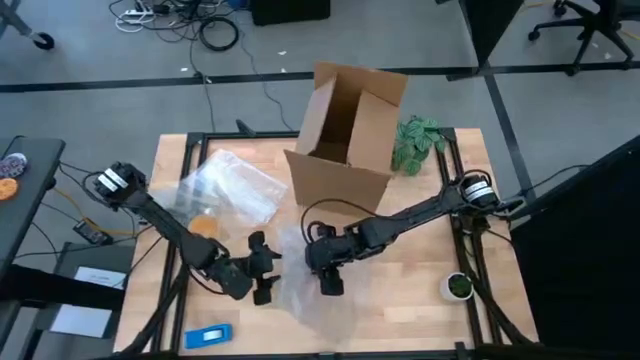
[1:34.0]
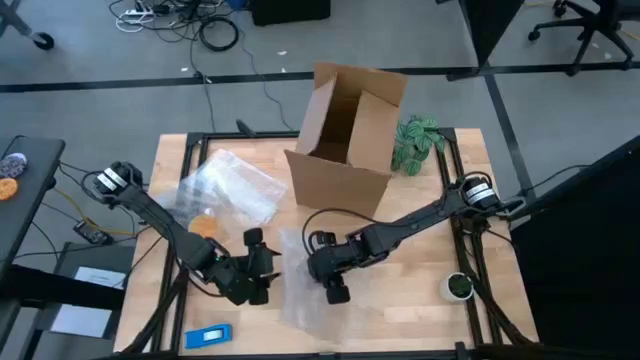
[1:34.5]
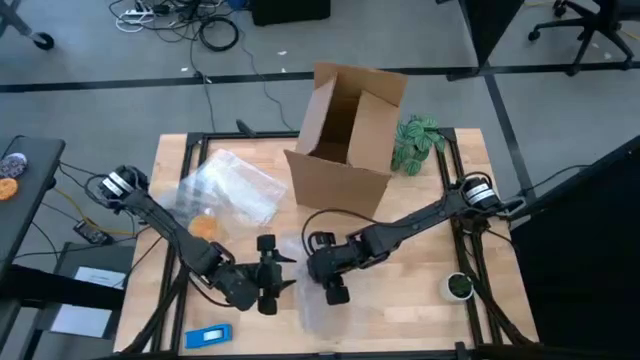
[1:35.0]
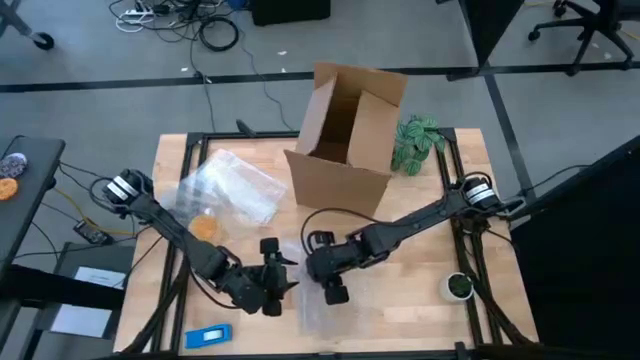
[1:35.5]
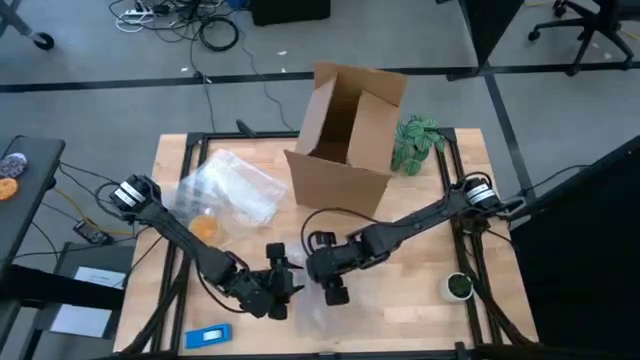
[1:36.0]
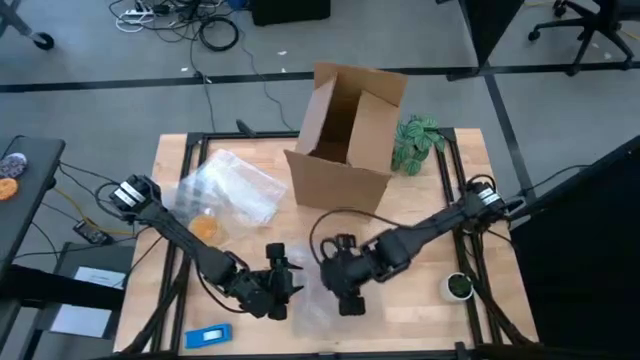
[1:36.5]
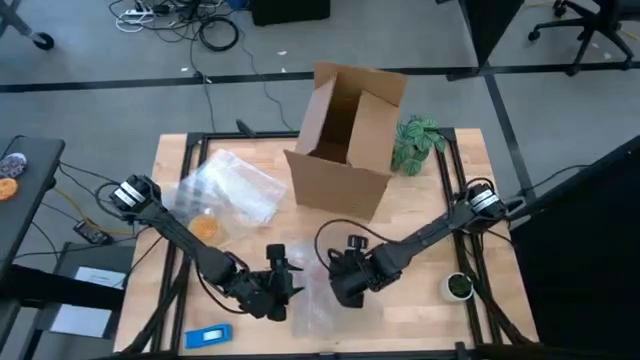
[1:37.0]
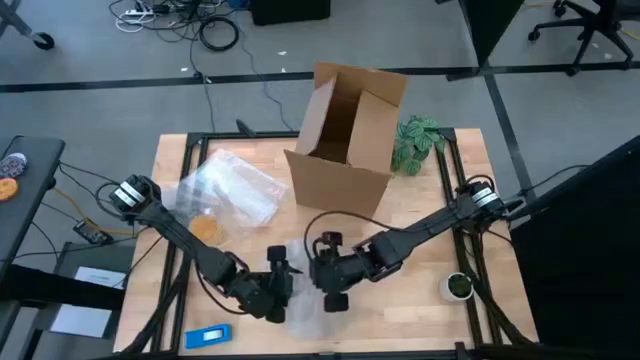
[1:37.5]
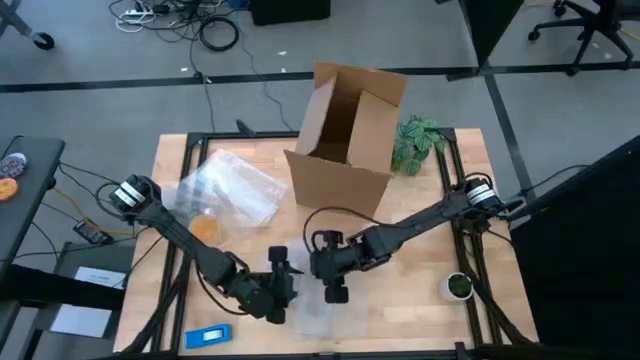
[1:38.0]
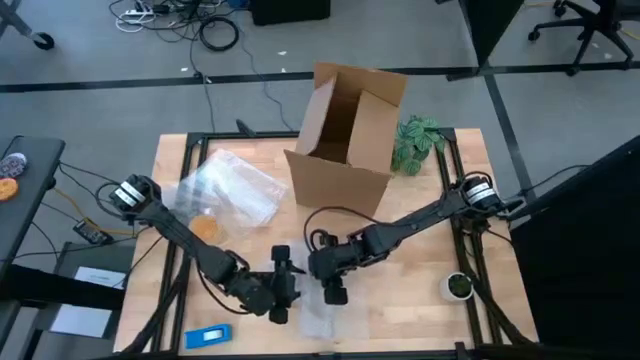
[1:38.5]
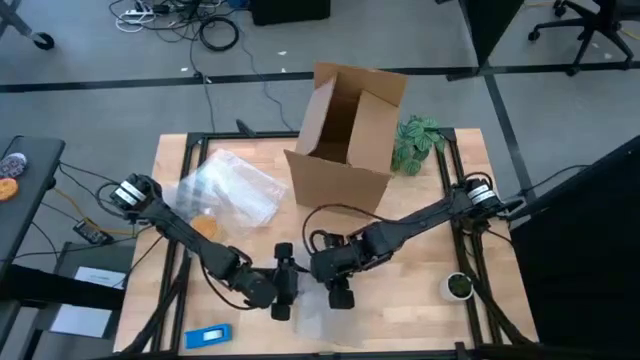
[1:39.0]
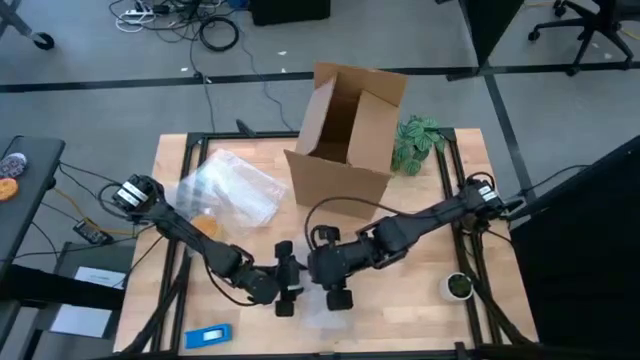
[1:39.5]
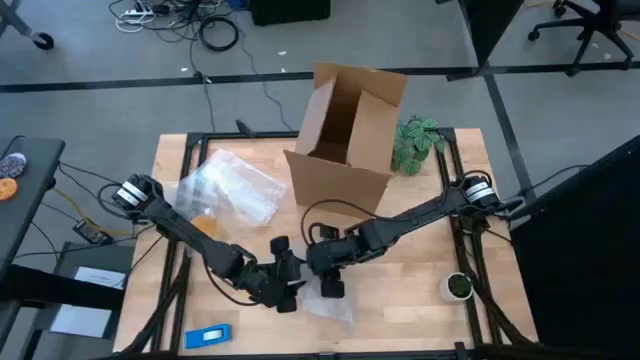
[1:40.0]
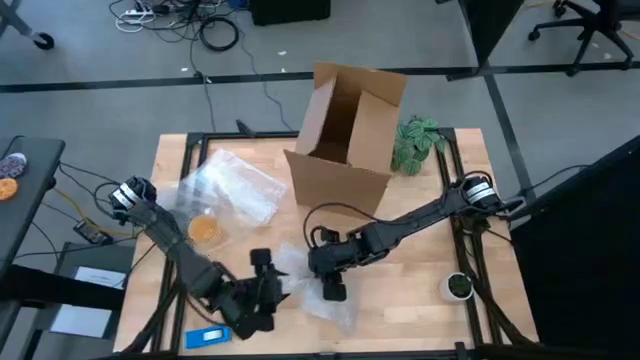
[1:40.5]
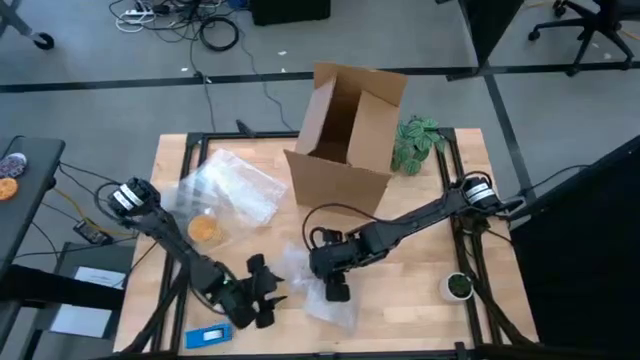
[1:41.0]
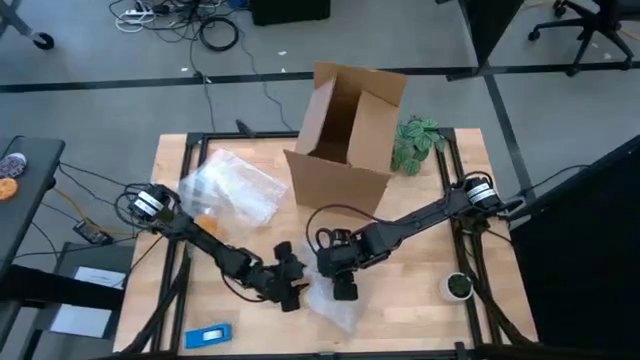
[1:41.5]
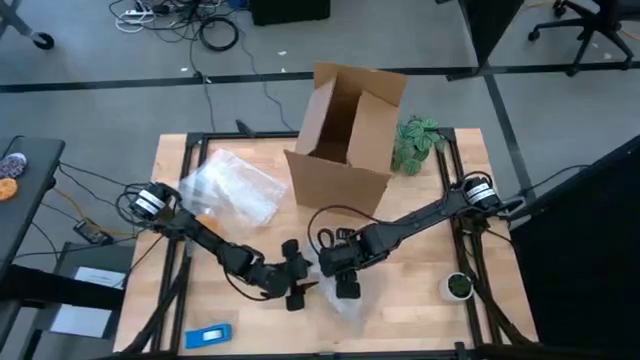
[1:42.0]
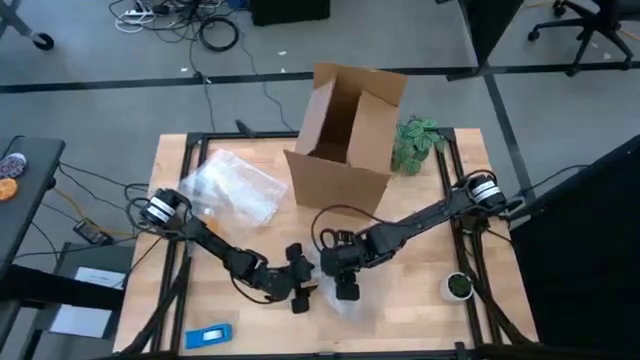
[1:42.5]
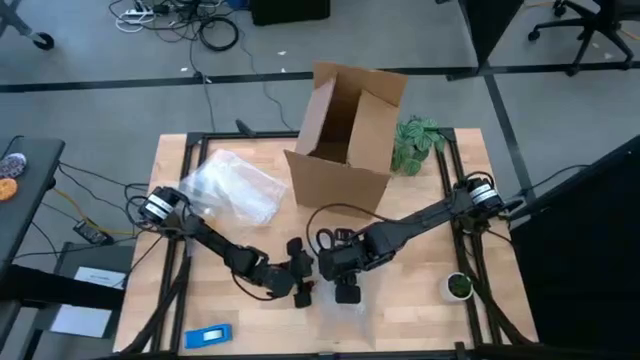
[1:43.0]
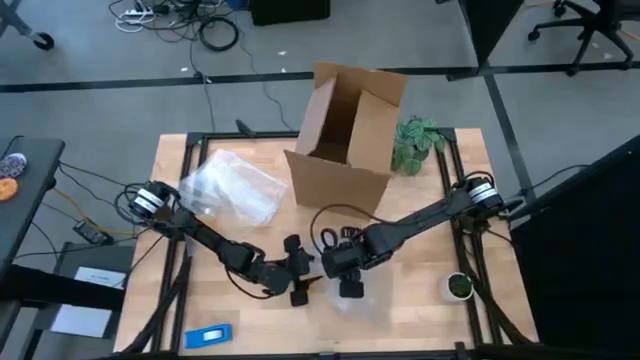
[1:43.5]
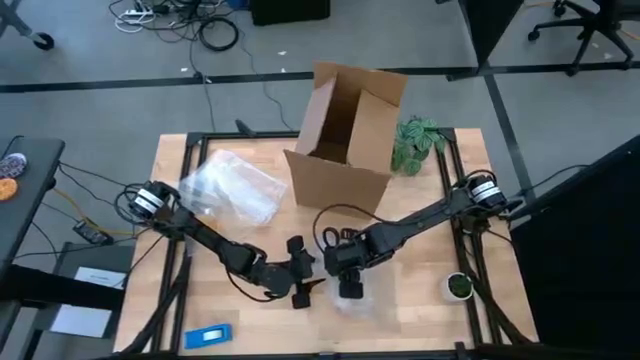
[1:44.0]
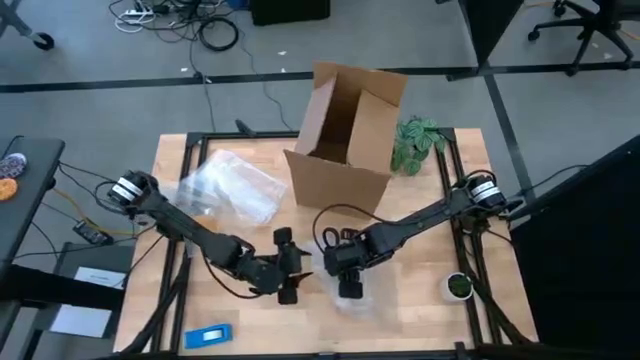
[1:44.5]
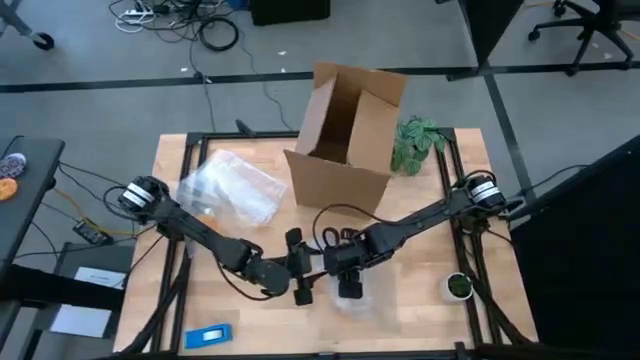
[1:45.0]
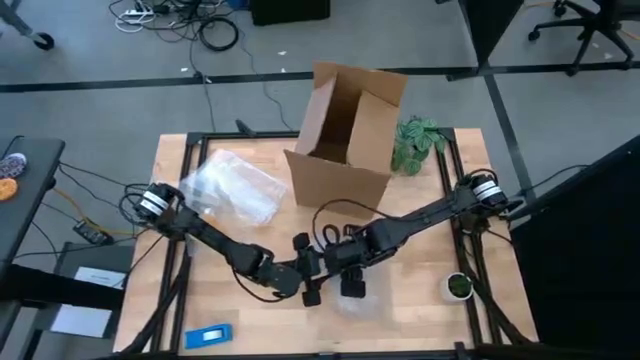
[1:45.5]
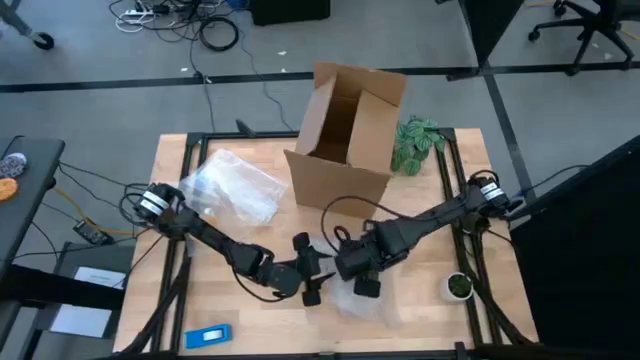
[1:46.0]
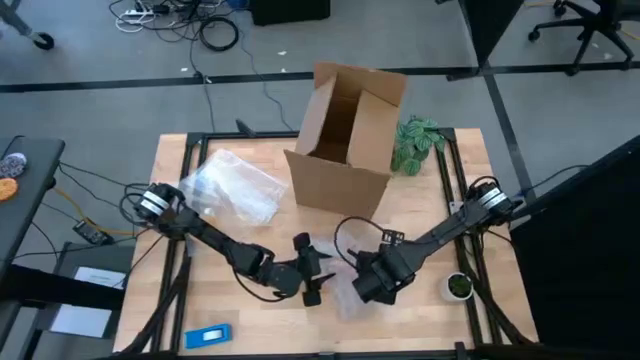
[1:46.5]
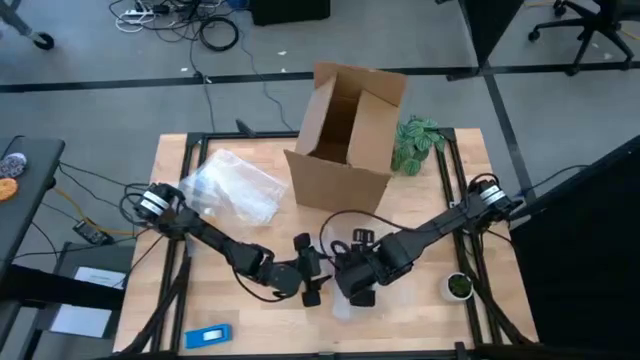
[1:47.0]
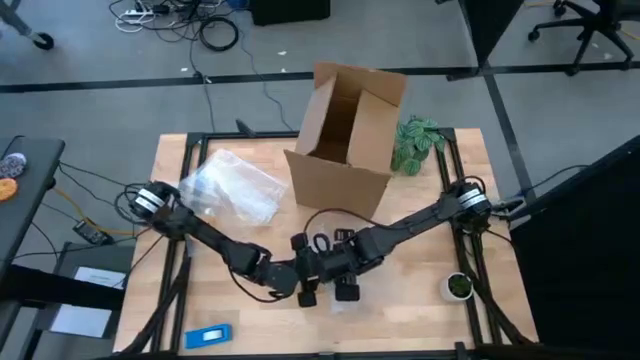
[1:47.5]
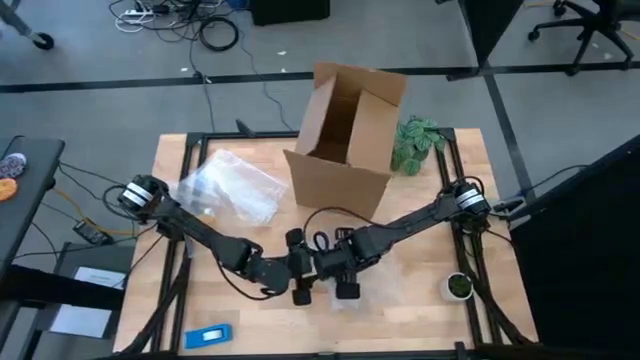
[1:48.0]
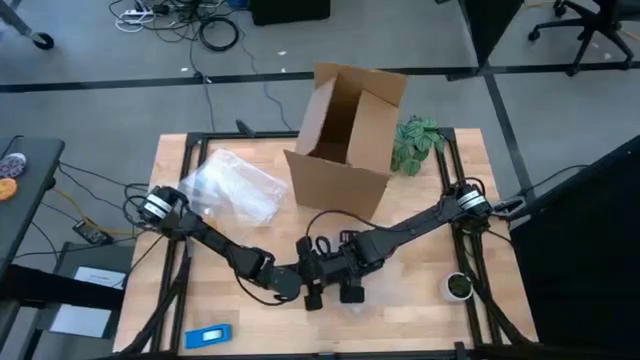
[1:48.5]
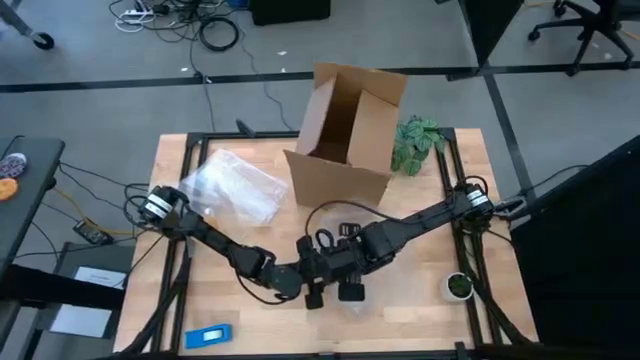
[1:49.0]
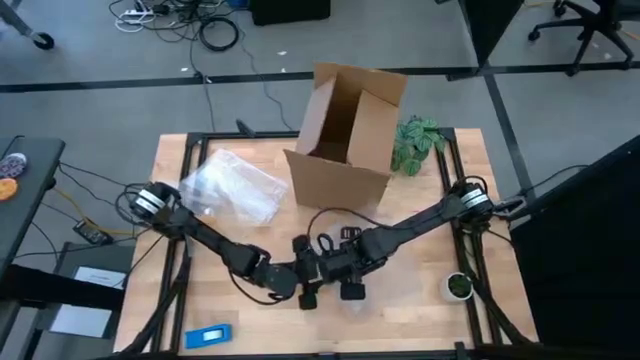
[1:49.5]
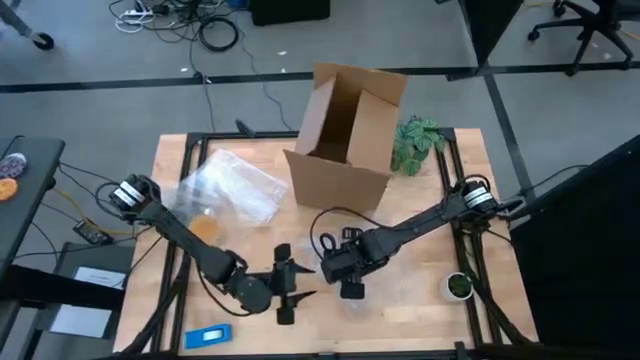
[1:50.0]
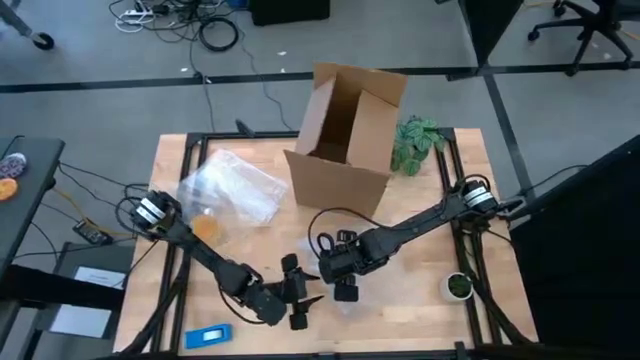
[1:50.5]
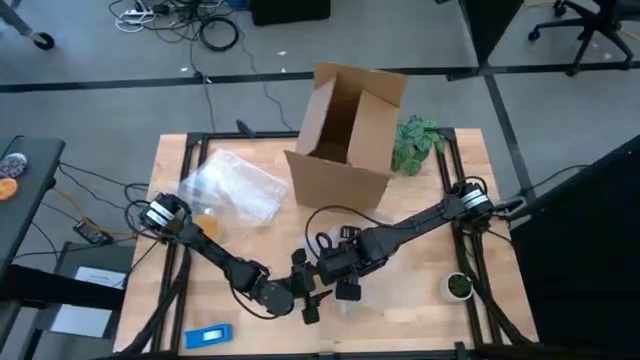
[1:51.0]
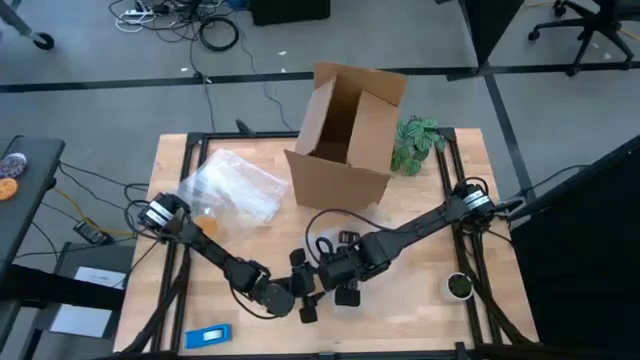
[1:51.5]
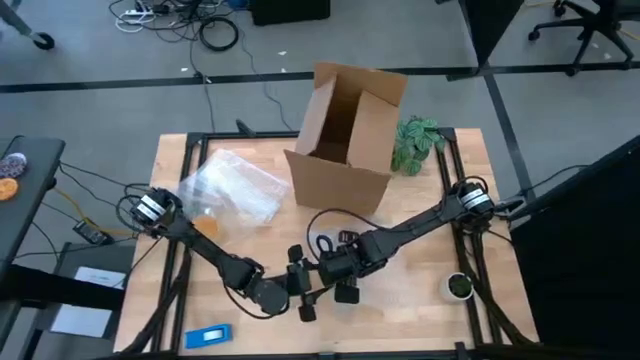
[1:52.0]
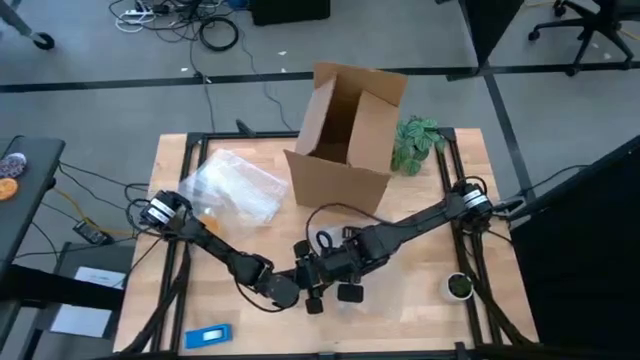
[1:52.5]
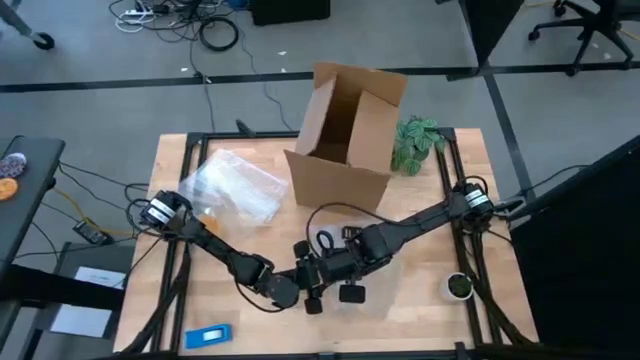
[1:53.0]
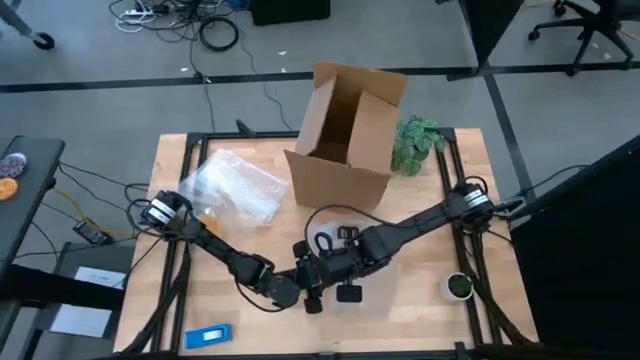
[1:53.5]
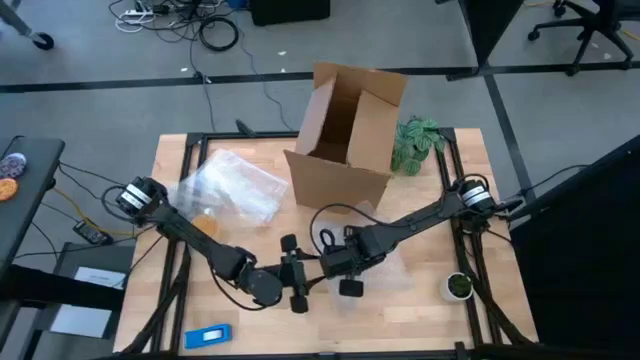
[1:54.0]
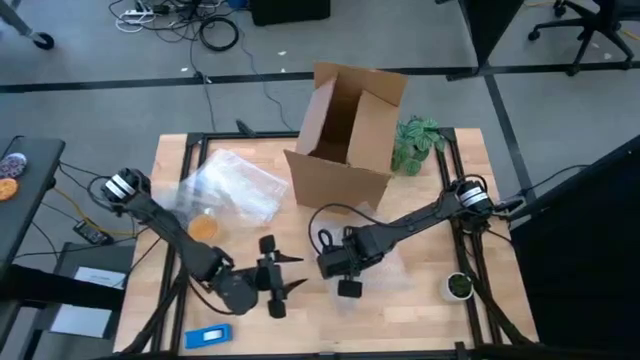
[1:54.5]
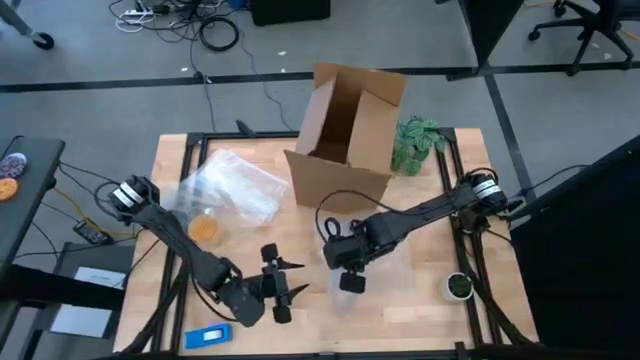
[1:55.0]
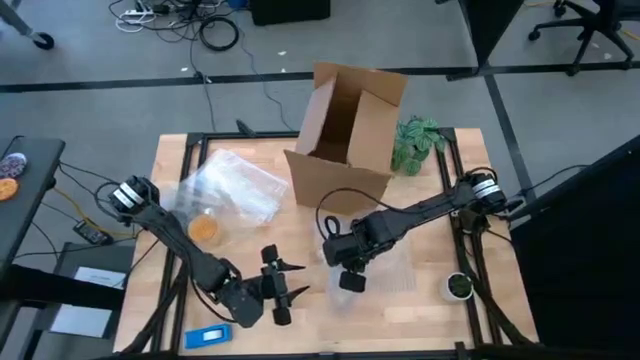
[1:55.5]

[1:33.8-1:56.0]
Task: wrap mug
Wrap the orange mug with transparent bubble wrap
